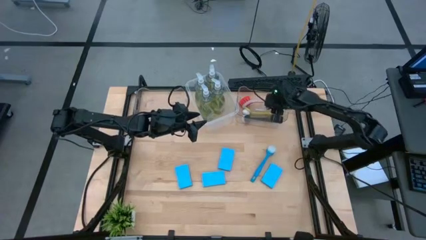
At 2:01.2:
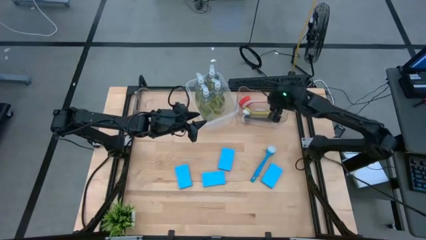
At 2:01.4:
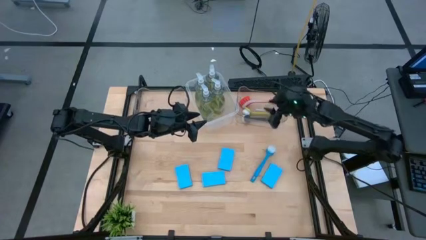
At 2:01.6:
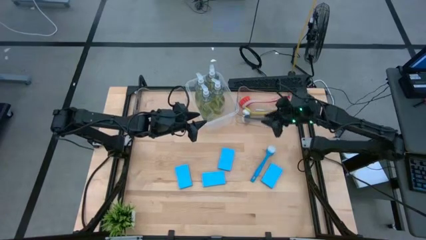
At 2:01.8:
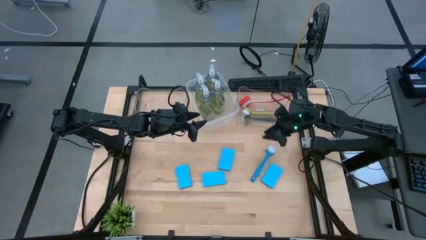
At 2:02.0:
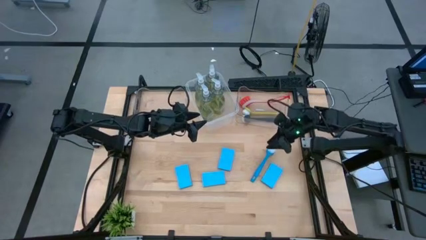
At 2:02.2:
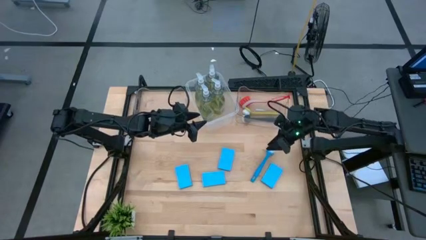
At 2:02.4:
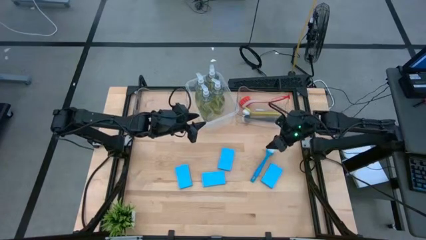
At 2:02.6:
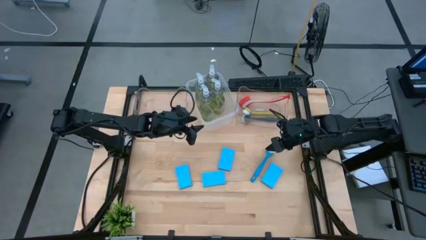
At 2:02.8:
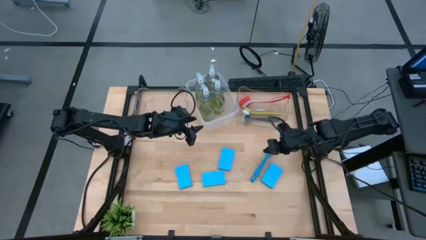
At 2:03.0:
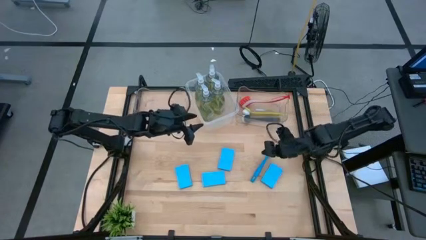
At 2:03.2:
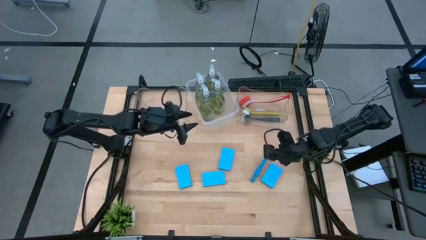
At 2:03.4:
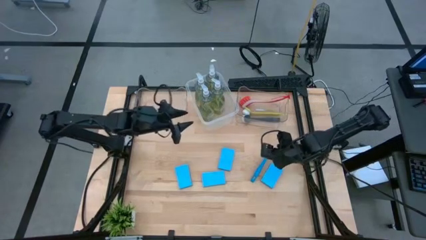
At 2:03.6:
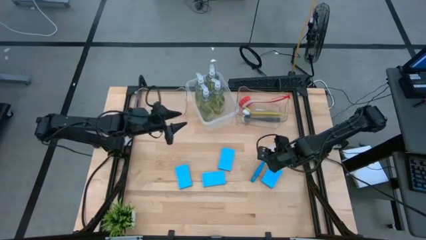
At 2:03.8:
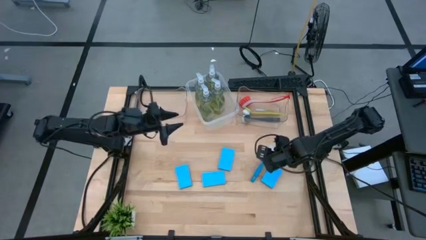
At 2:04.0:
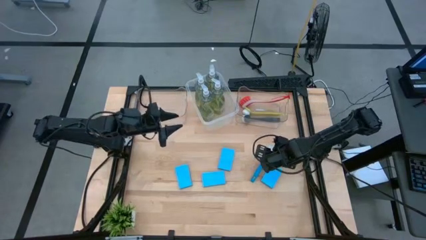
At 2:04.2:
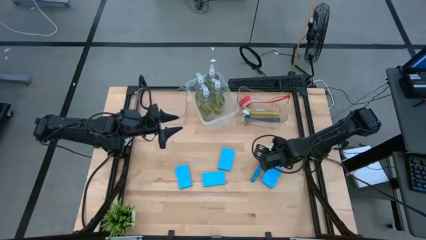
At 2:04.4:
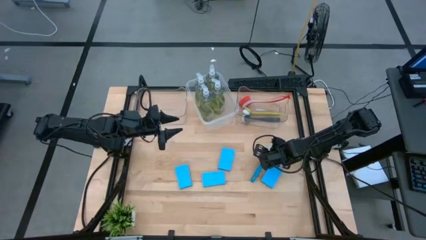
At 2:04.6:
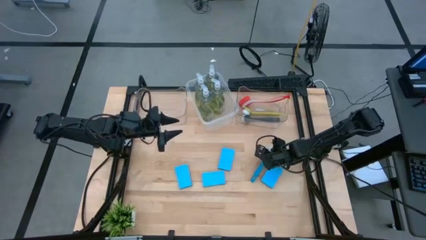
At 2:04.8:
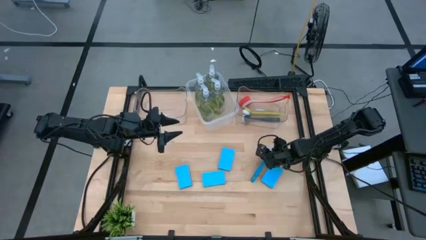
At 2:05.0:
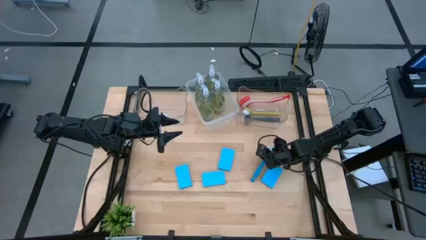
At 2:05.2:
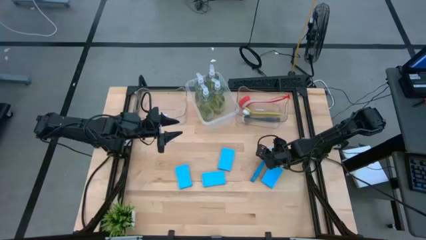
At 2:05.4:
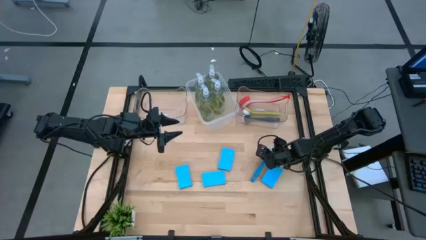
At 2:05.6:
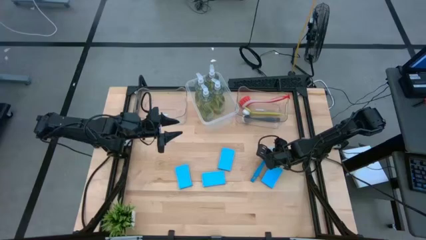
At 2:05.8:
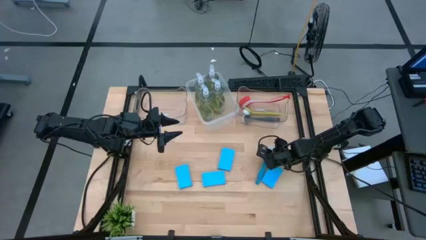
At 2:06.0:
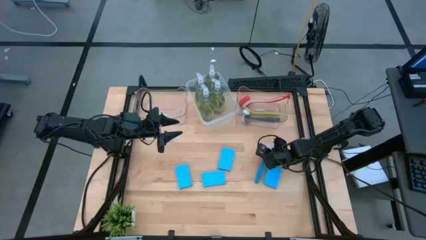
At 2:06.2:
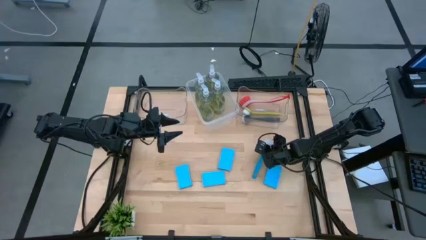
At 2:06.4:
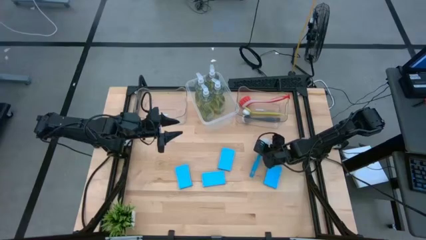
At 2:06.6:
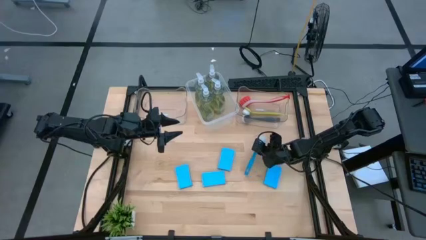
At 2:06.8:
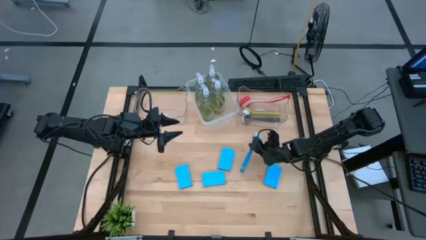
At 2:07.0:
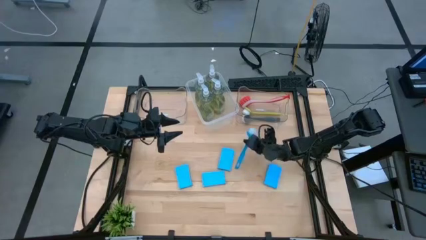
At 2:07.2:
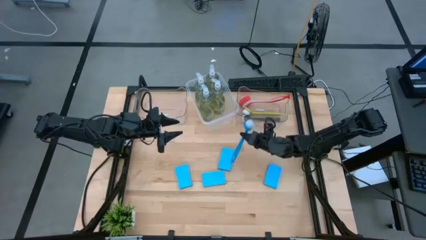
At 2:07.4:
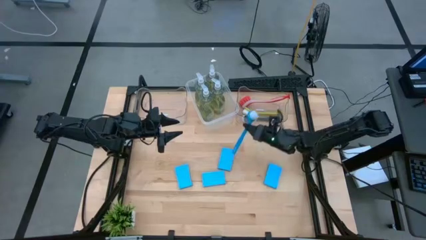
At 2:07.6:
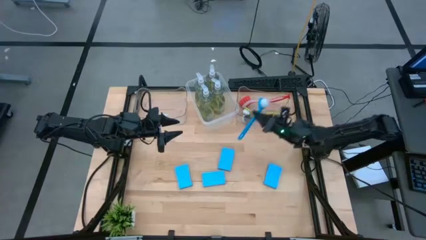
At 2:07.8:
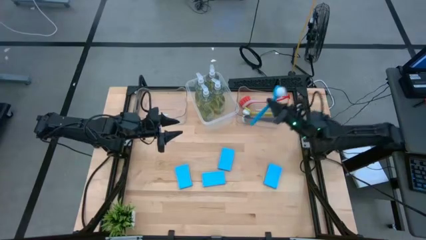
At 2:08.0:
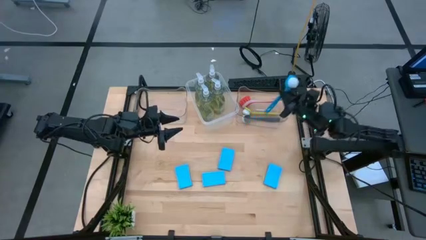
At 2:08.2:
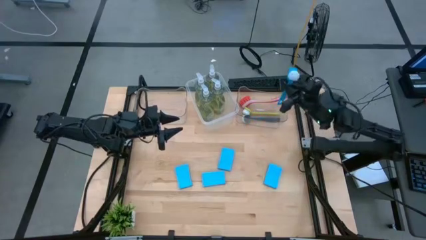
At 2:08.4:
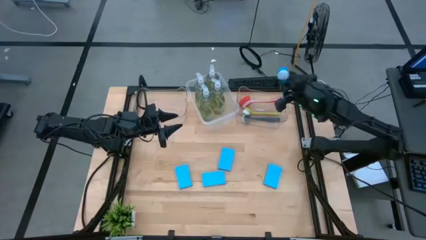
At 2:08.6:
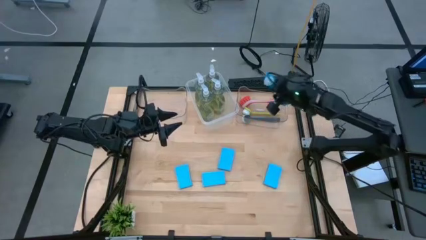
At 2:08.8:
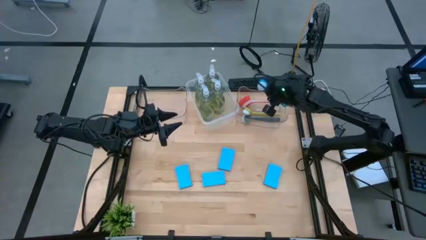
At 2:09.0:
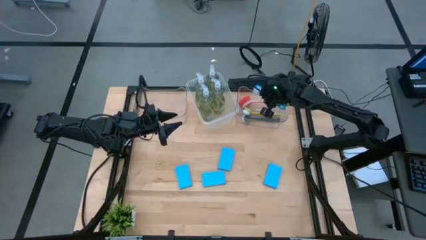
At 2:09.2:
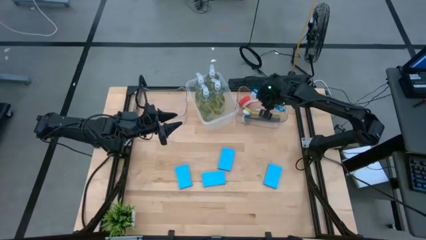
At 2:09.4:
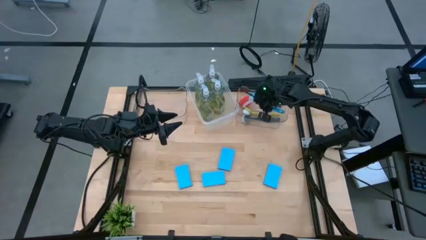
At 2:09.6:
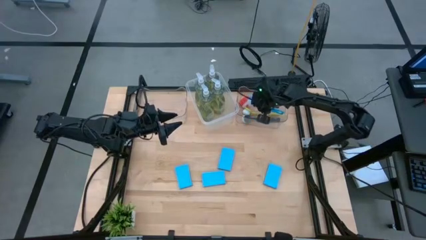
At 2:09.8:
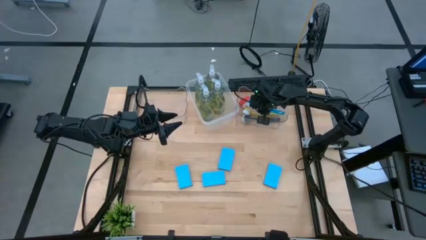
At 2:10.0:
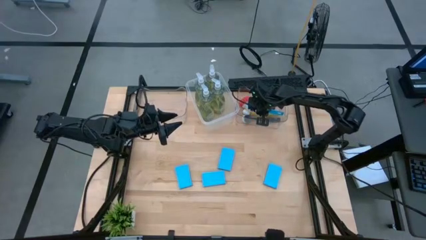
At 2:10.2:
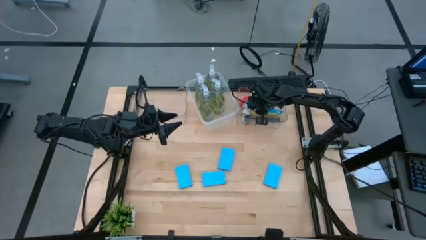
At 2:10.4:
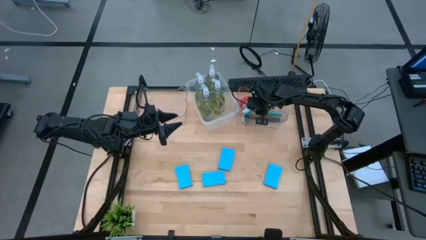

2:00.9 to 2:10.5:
Task: Pick & Place Kitchen Sink Supplies
Put the blue toilet brush into the right transparent bin
